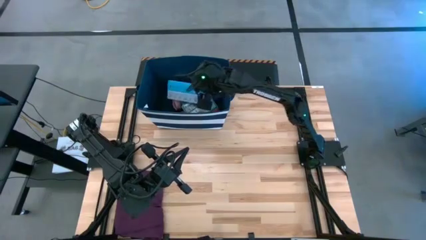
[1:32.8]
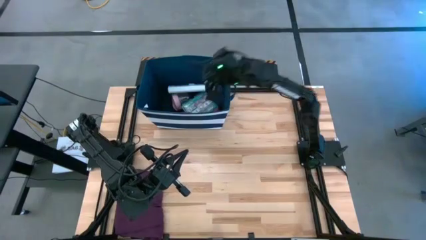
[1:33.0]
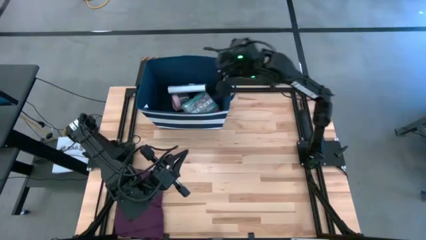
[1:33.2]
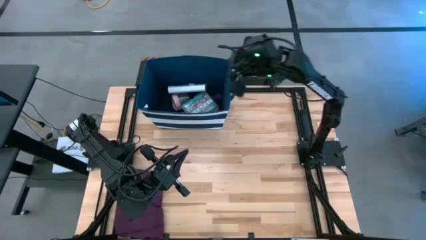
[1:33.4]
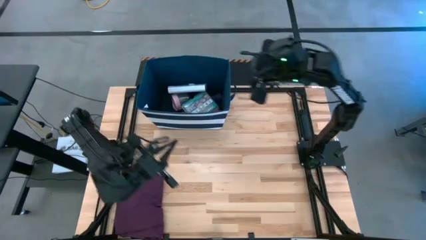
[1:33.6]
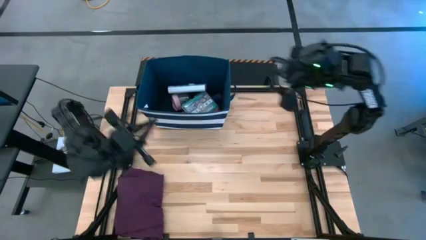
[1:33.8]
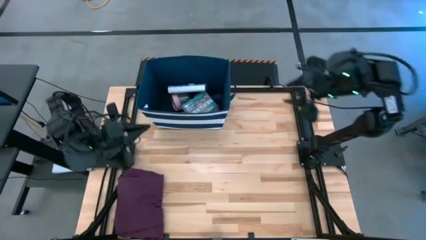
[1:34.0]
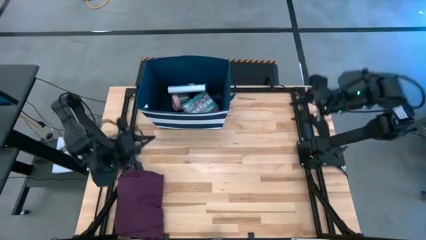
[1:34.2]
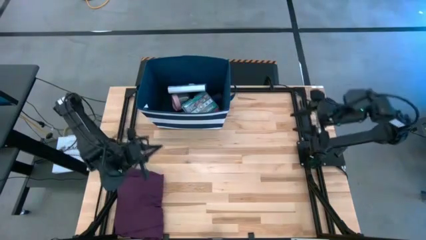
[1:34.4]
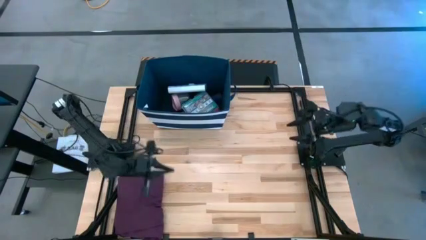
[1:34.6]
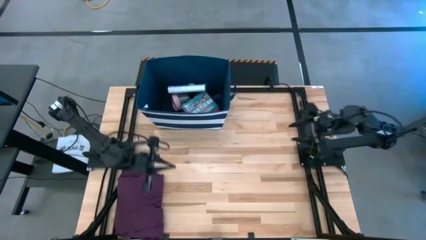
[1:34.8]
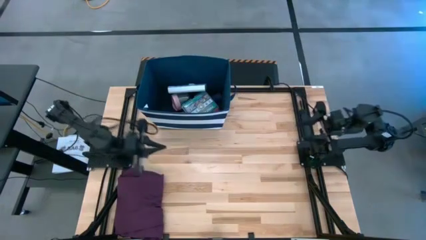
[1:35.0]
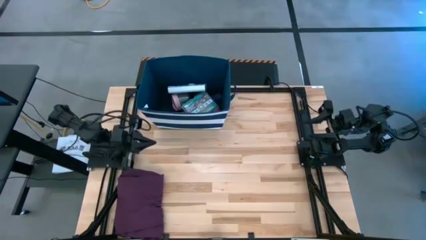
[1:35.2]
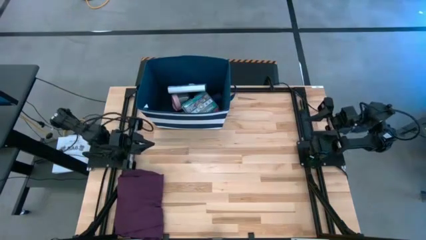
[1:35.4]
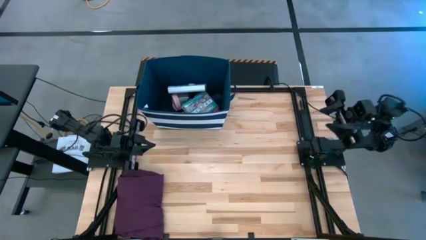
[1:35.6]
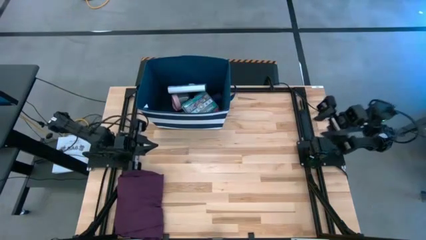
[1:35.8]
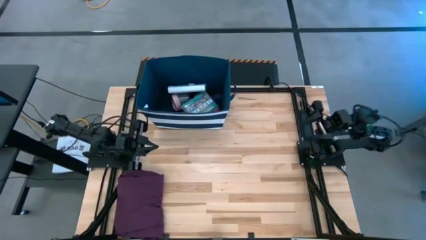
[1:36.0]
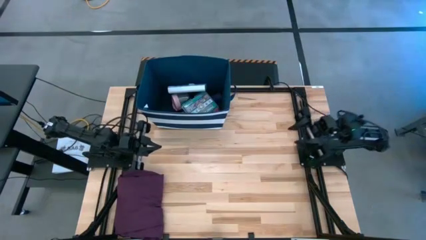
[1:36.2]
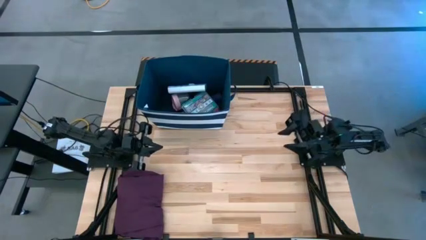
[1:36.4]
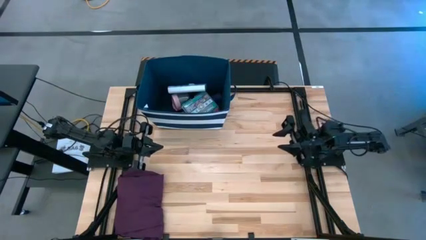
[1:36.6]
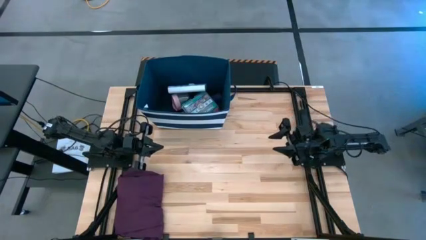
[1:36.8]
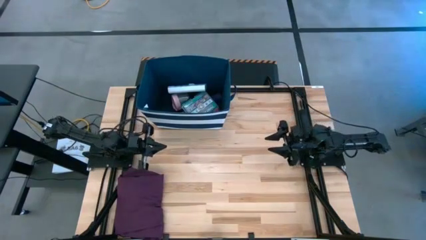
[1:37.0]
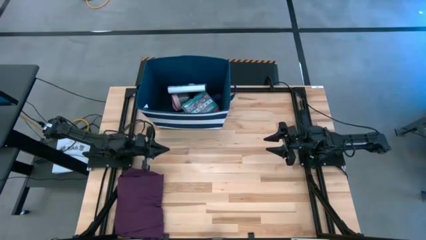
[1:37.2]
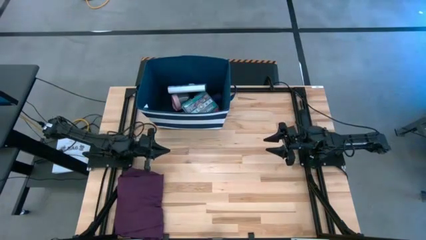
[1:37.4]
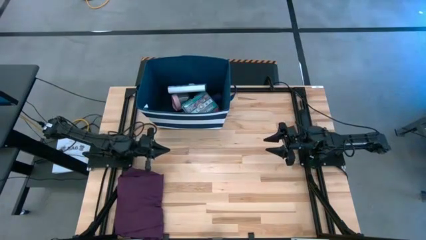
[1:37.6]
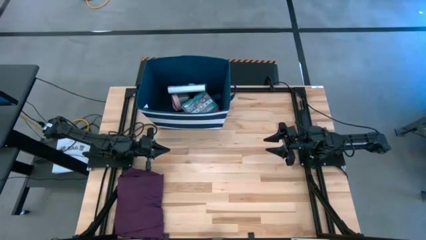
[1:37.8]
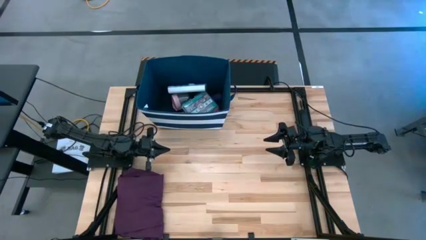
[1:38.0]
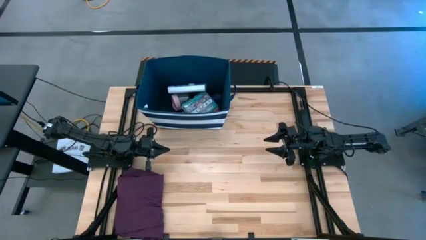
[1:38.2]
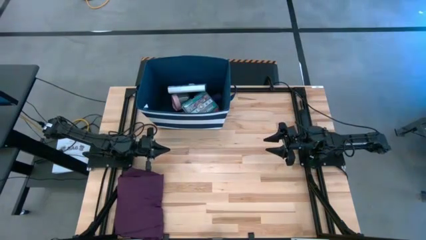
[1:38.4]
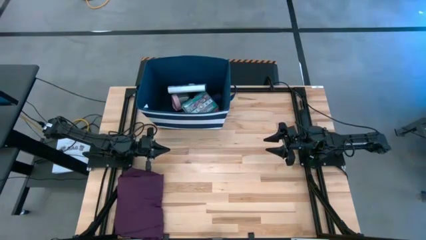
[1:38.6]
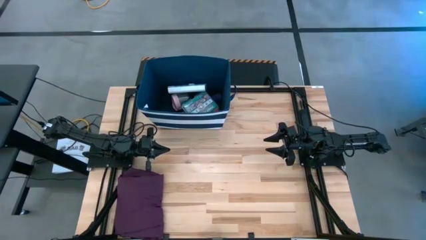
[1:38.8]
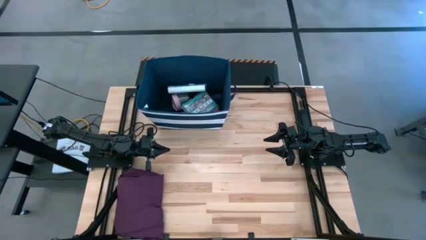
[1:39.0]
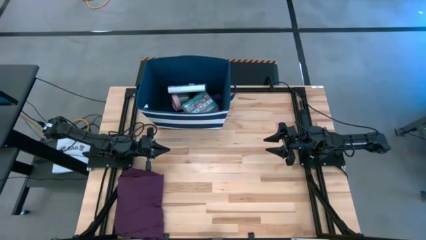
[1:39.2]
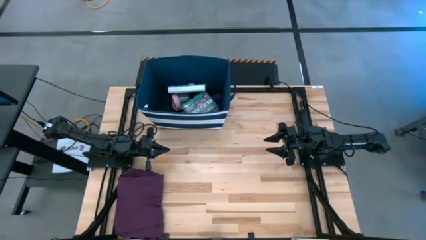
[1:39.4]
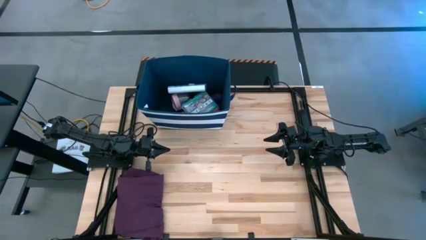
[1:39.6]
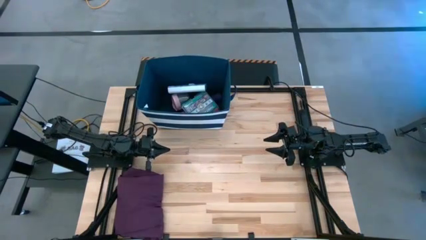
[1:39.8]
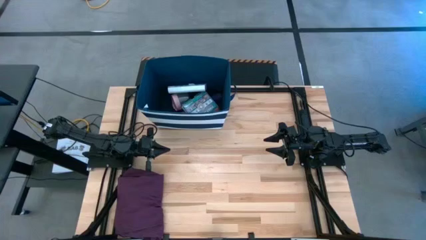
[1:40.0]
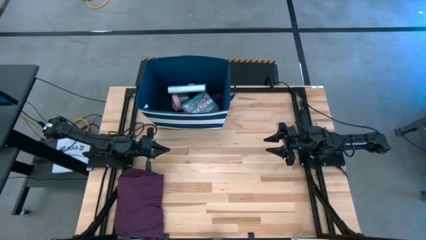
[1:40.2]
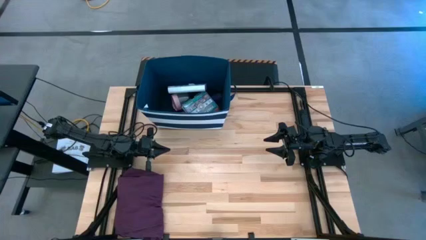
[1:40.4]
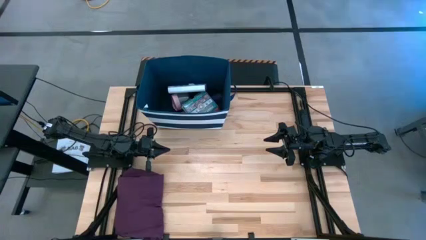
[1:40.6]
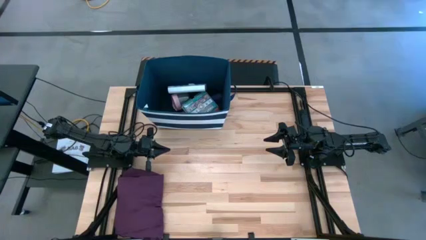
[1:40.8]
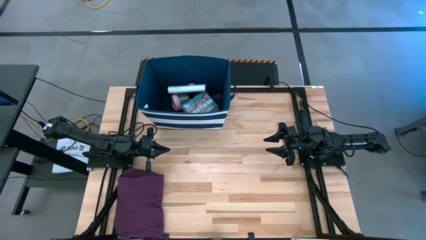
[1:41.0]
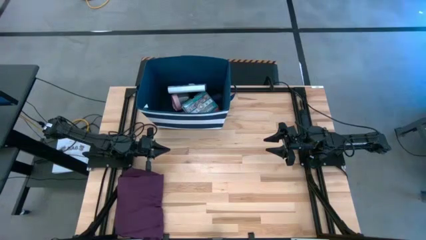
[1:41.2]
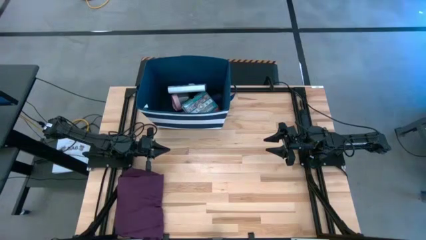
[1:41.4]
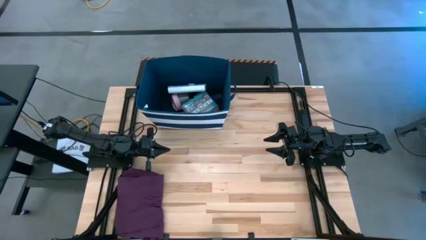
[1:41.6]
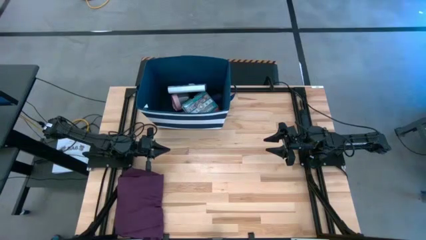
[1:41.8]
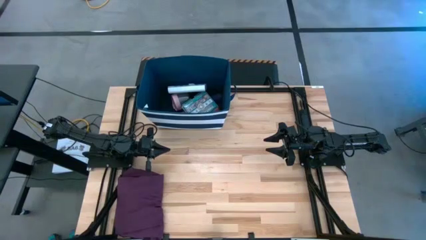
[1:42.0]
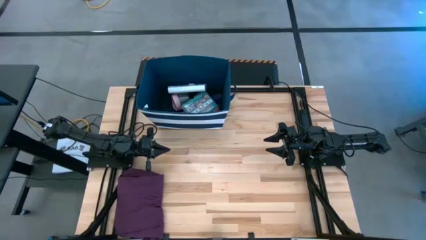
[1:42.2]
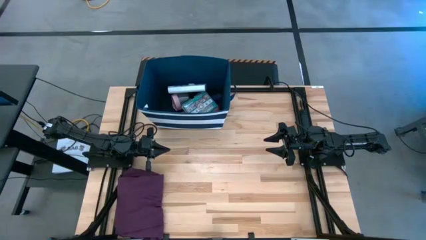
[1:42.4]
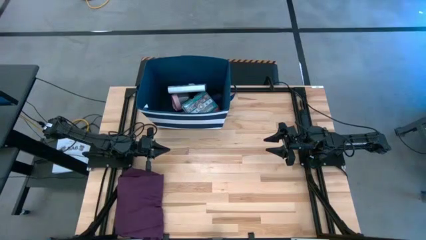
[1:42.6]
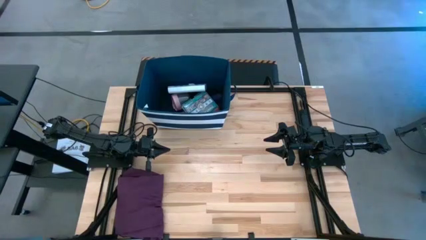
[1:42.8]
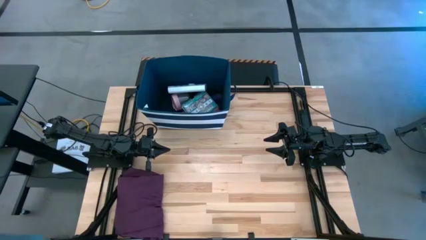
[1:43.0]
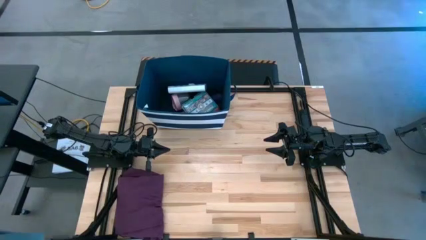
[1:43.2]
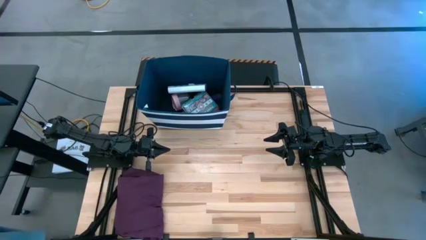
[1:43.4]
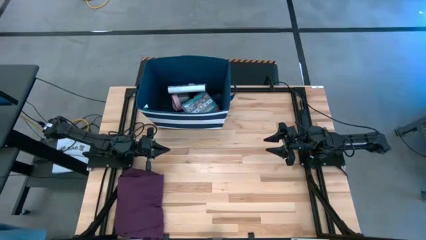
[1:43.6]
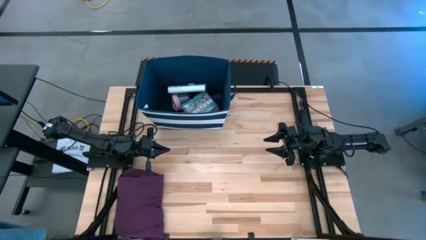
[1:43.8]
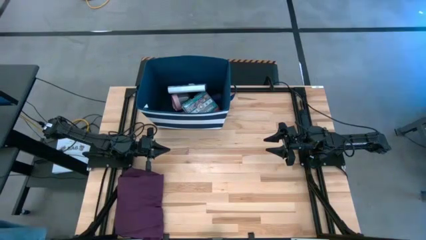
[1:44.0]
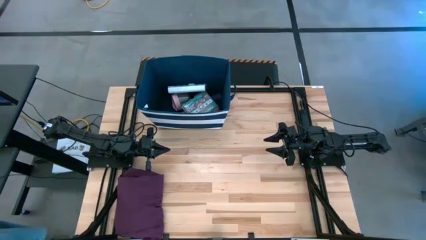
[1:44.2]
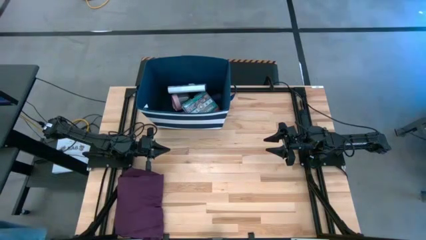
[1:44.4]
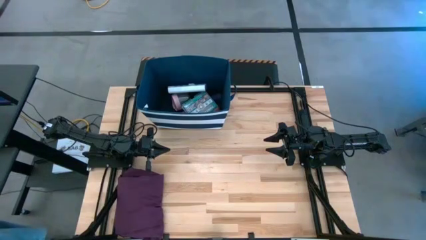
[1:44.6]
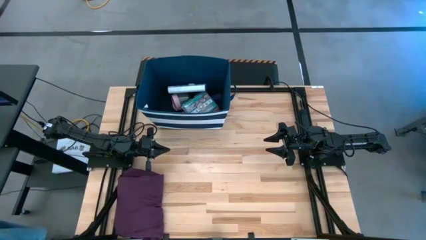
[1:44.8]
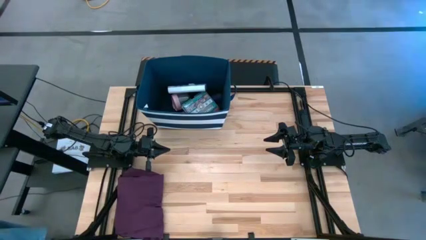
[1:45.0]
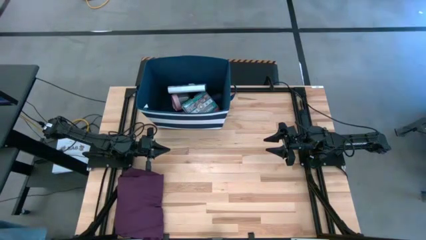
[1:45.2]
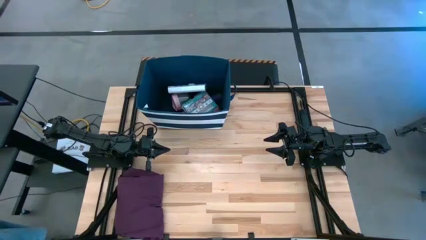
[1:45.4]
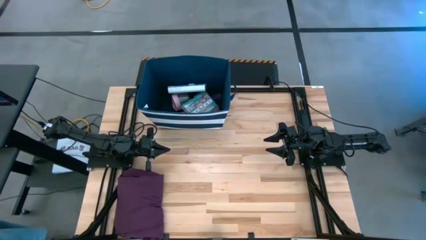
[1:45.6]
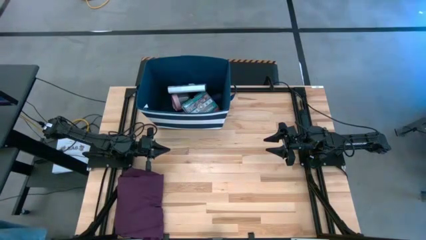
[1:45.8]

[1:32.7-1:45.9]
Task: Pick & place medical supplies in basket/bin
Return to Home Position
